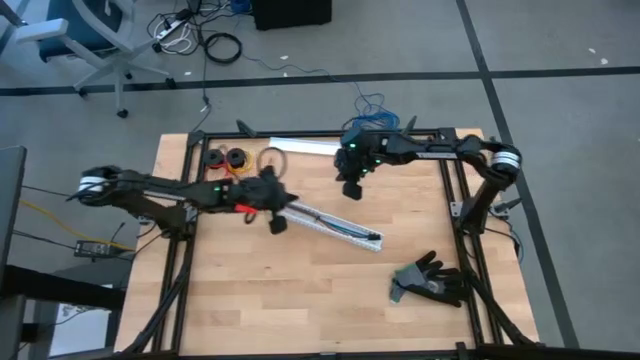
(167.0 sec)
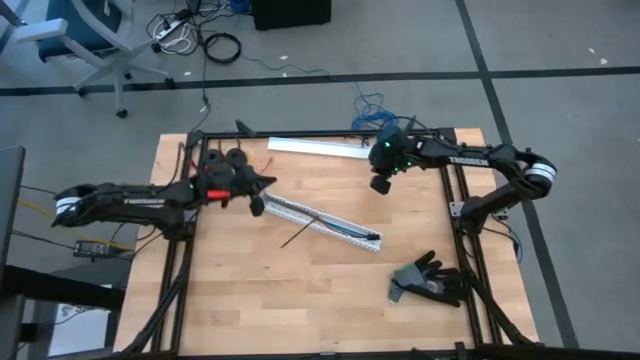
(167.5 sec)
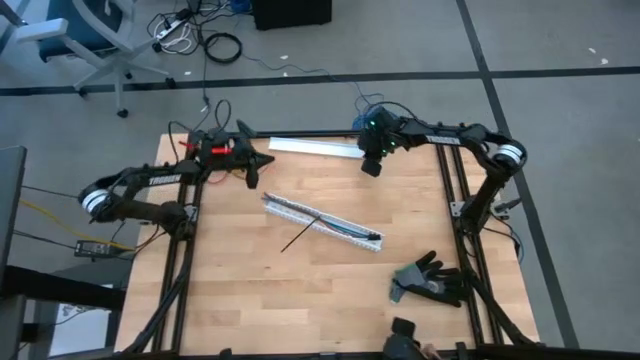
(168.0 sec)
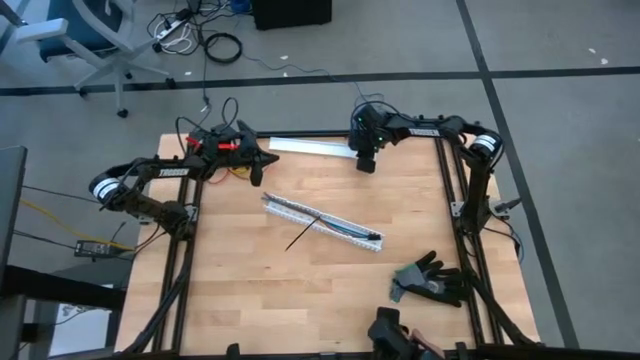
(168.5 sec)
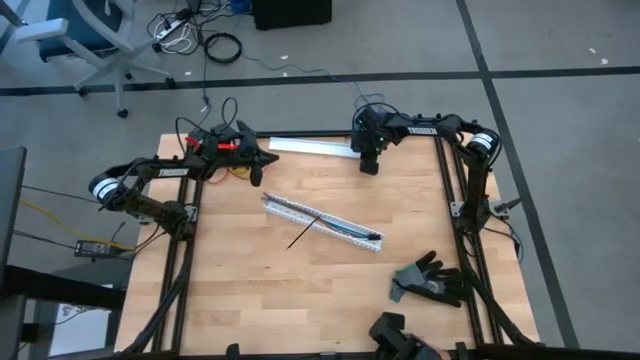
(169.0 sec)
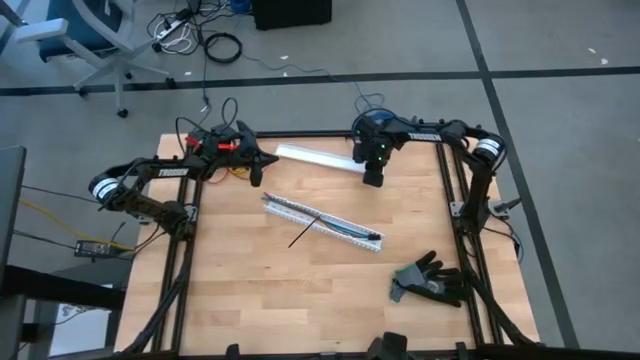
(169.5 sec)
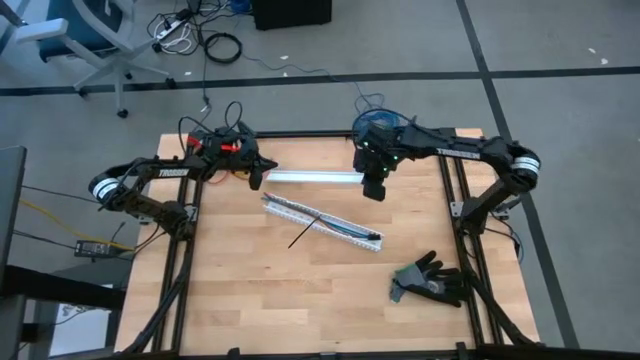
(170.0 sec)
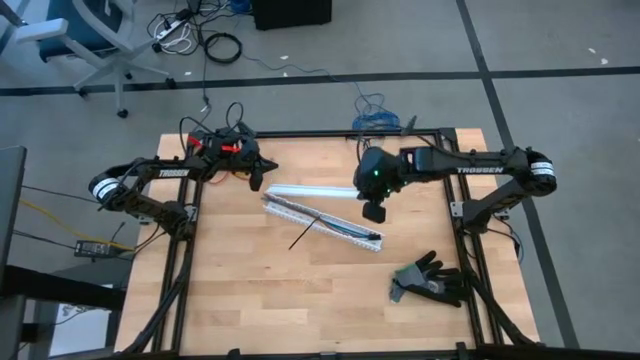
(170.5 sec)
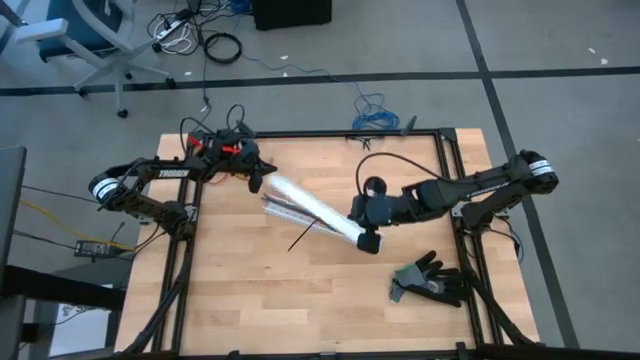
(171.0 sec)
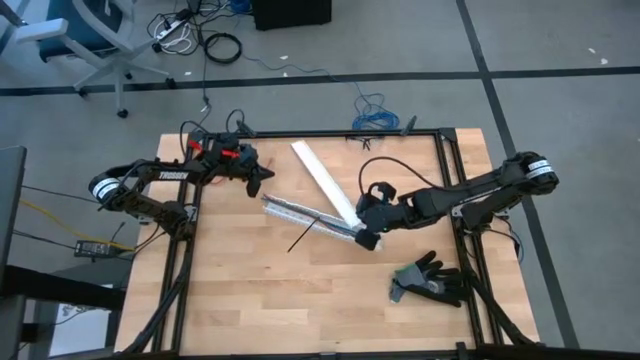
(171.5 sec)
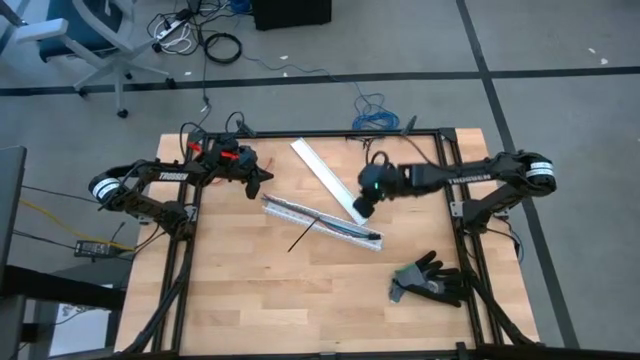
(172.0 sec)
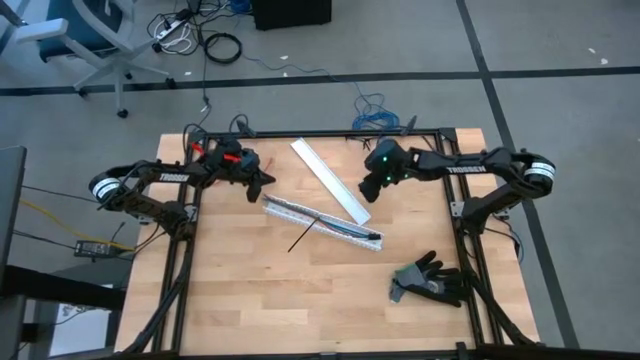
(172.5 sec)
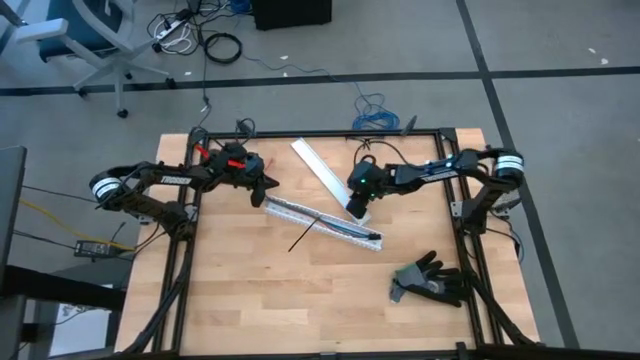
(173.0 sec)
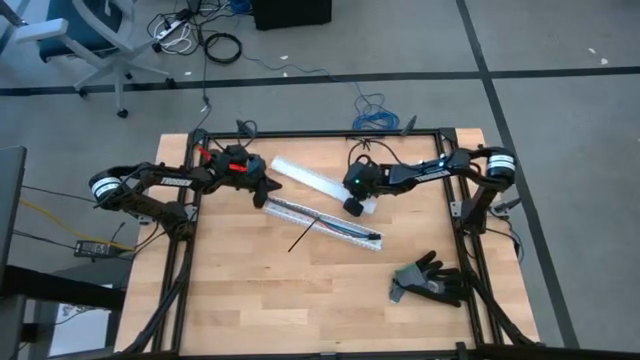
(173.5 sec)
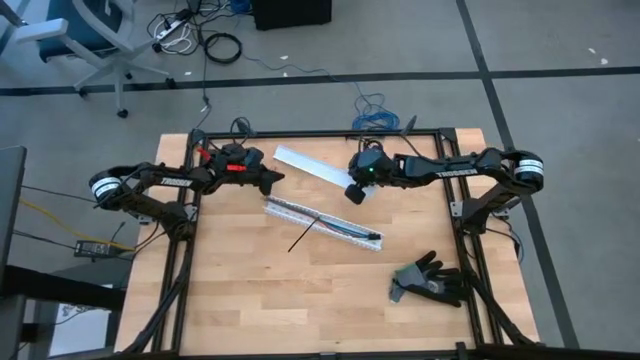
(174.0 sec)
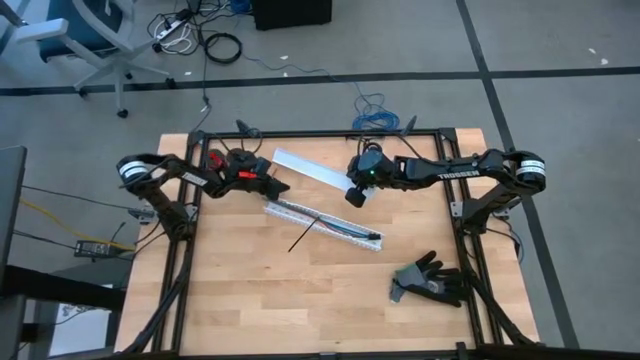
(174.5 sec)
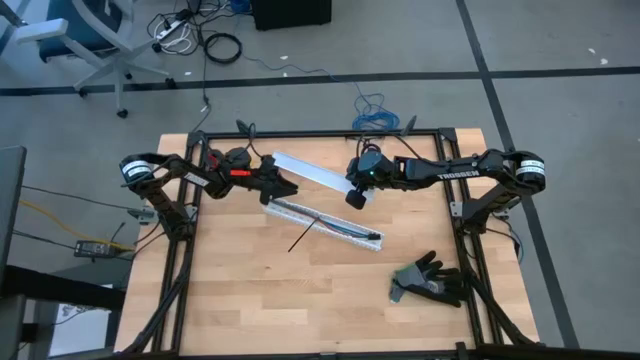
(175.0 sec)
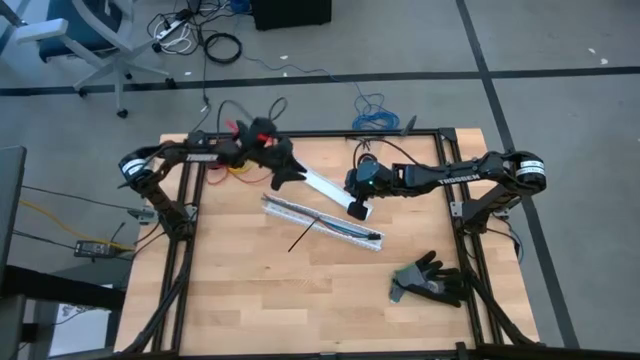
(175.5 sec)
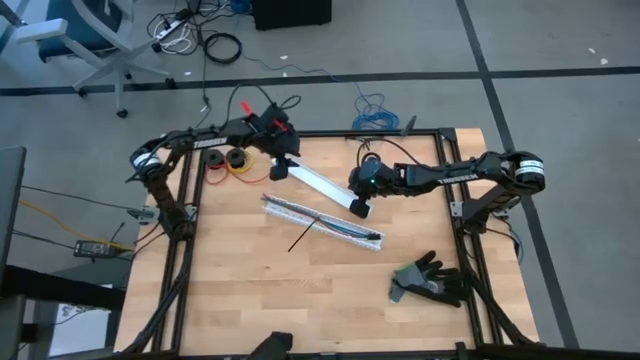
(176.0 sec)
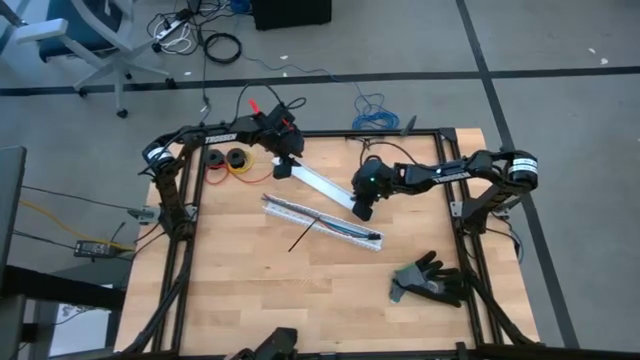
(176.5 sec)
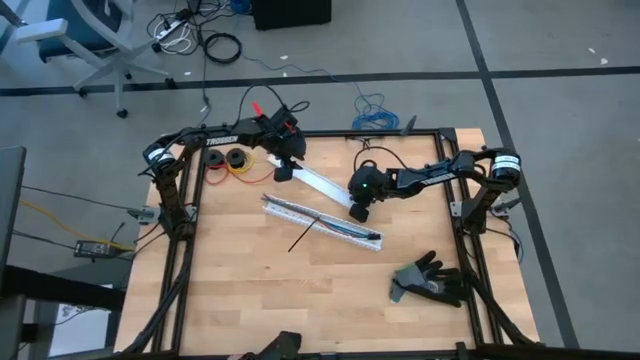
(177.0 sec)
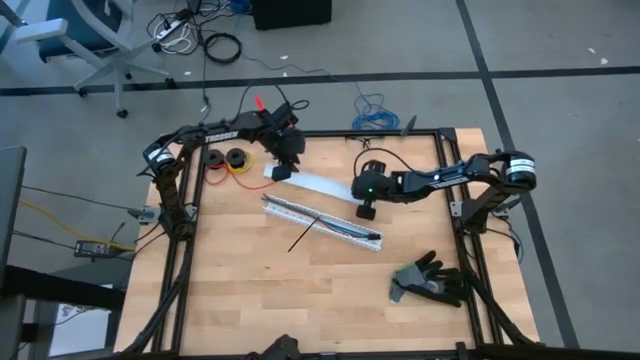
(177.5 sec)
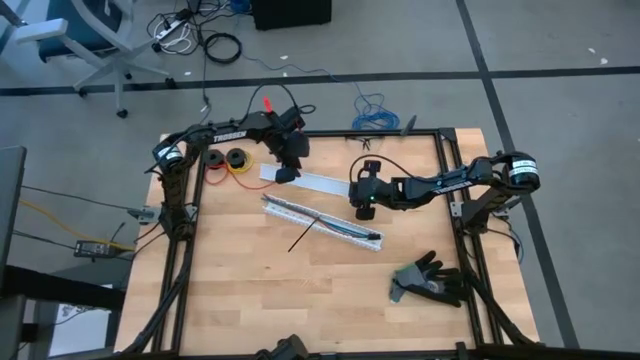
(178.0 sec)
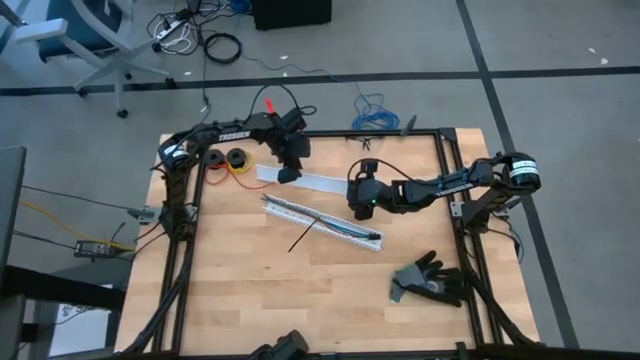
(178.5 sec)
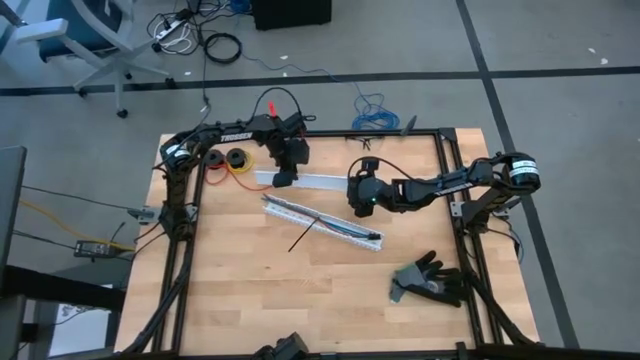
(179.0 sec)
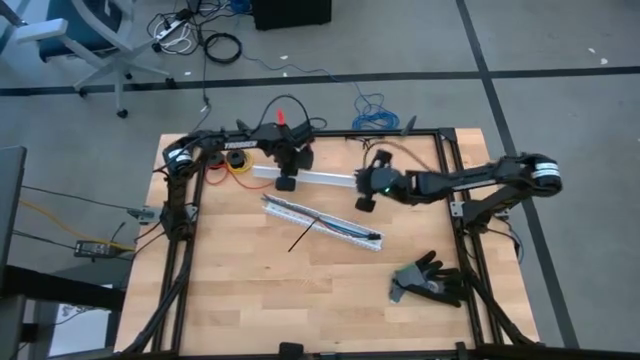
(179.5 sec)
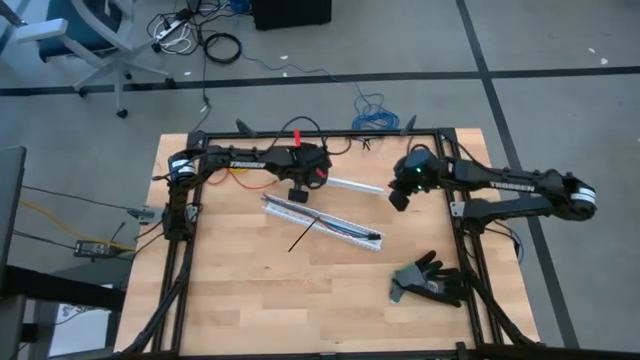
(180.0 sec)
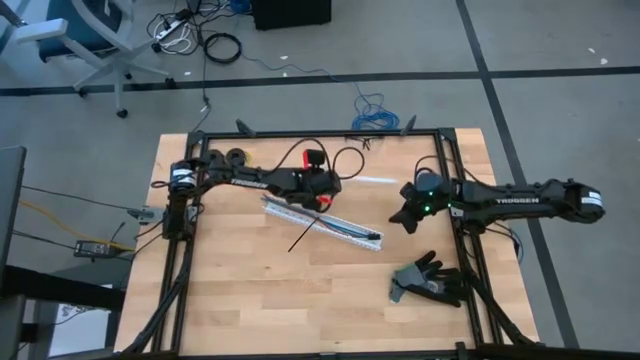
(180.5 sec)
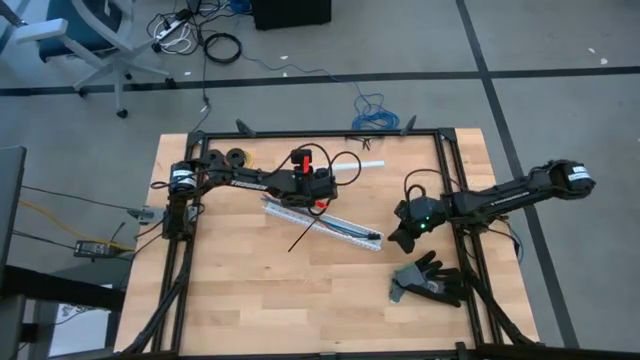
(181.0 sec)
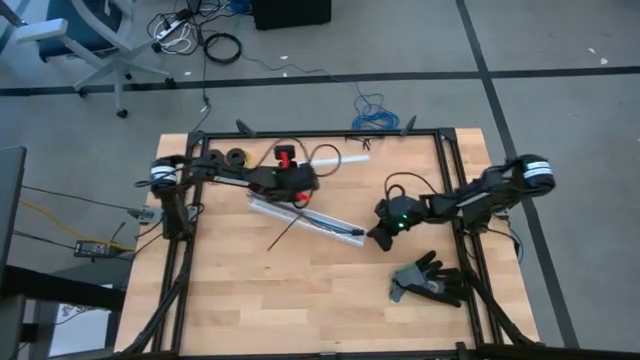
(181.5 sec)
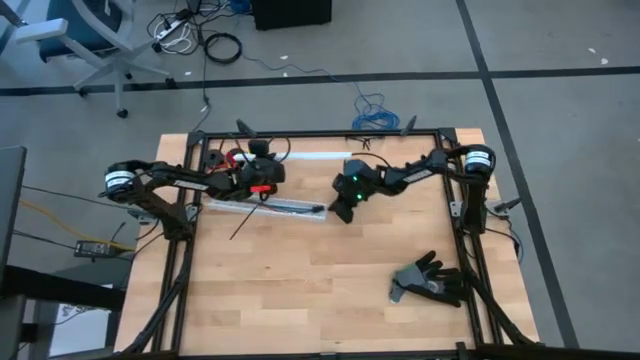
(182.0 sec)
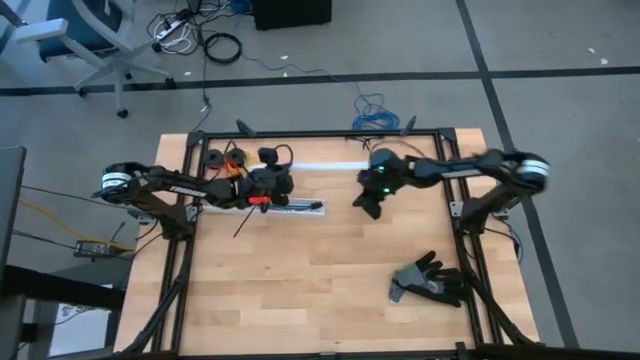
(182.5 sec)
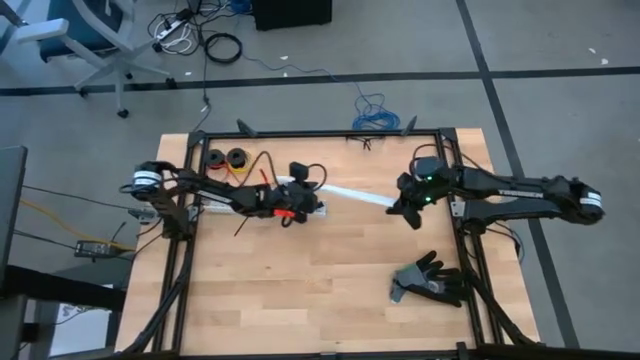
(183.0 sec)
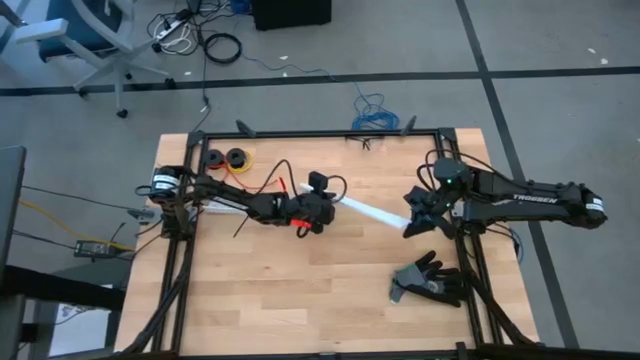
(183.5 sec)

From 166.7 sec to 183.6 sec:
Task: Ziptie cables
Close the white cable duct

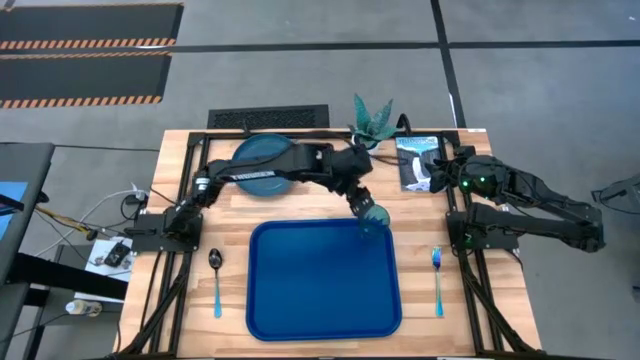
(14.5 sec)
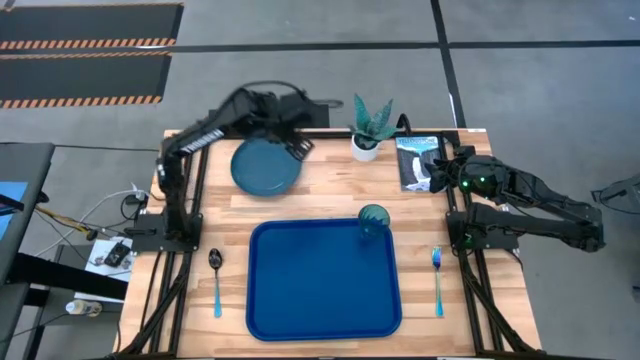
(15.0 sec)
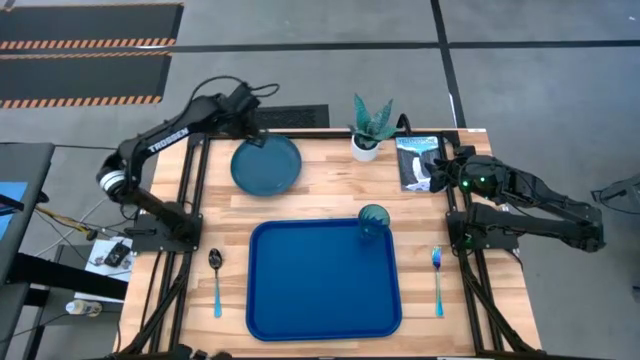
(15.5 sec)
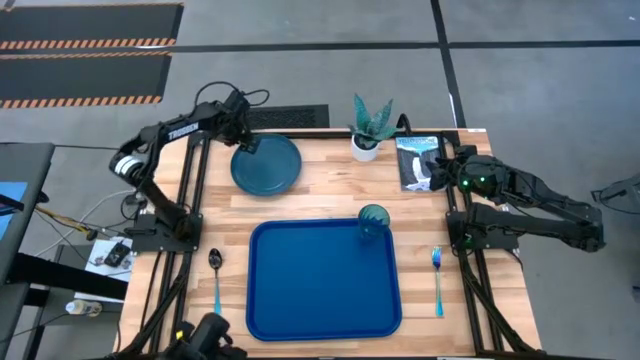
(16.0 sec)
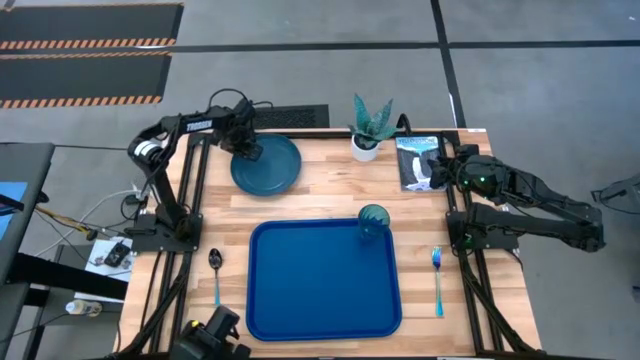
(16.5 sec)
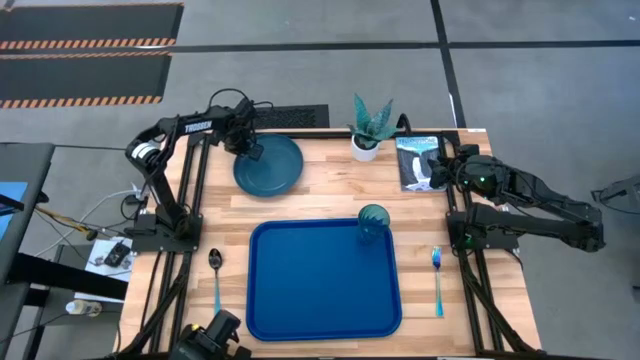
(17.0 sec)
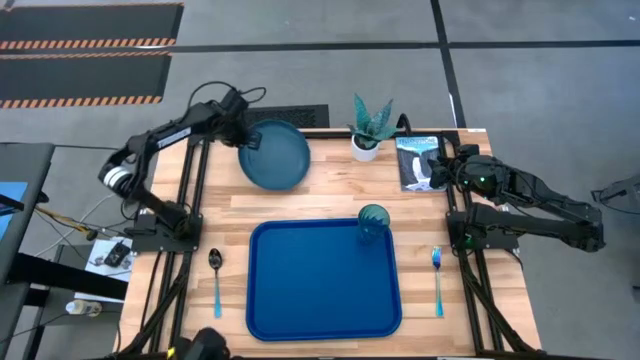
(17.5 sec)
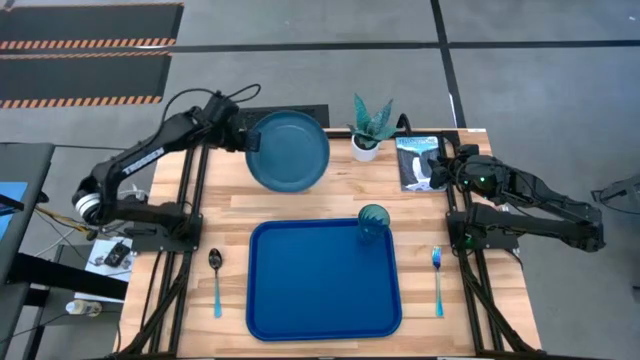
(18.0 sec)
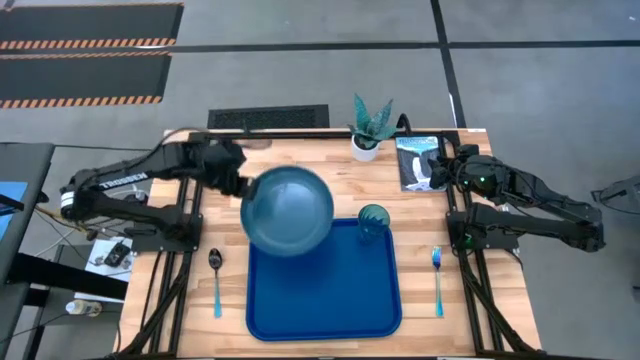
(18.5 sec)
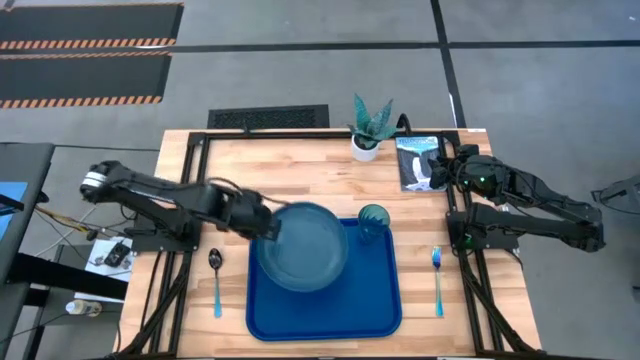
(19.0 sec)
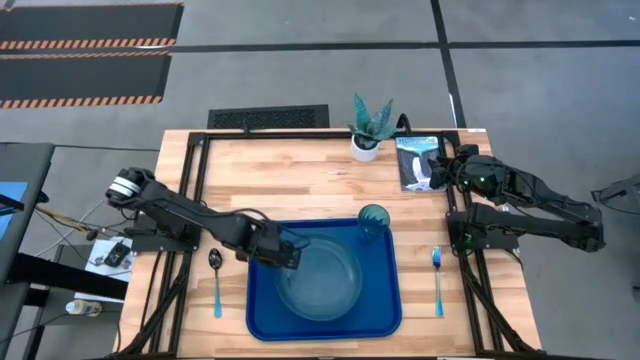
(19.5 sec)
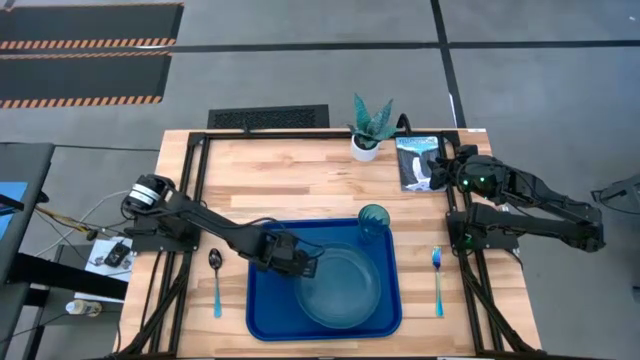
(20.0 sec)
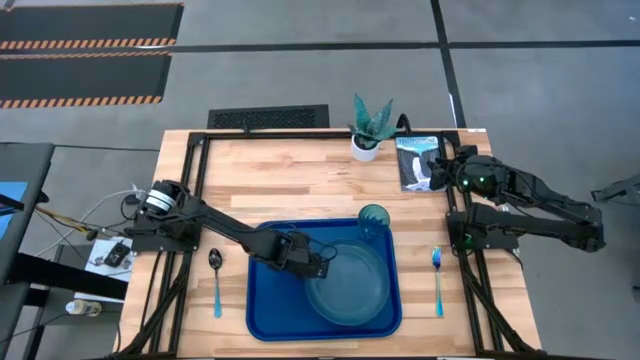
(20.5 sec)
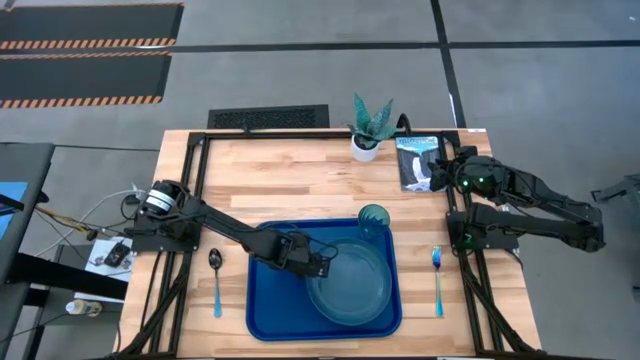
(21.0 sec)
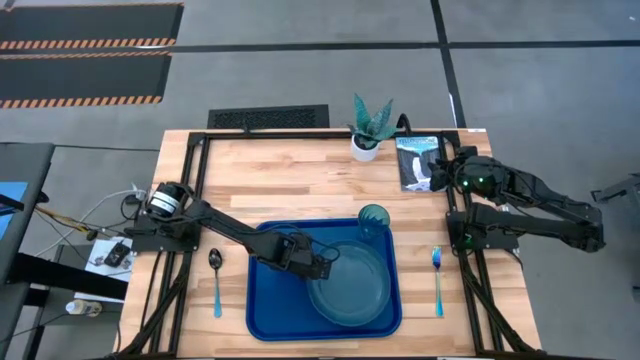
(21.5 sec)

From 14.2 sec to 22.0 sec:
Task: Pick and place plate/cup/fork/spoon on tray
Put the blue plate on the blue tray to the bottom of the blue cup
